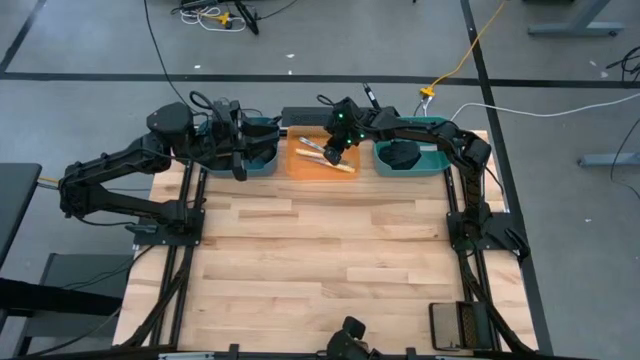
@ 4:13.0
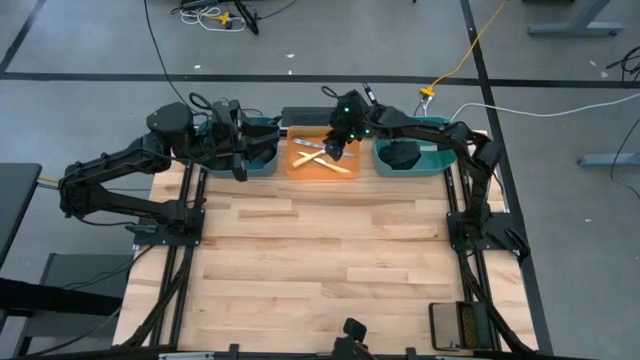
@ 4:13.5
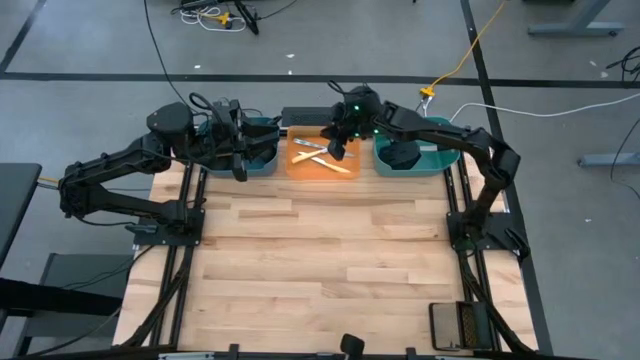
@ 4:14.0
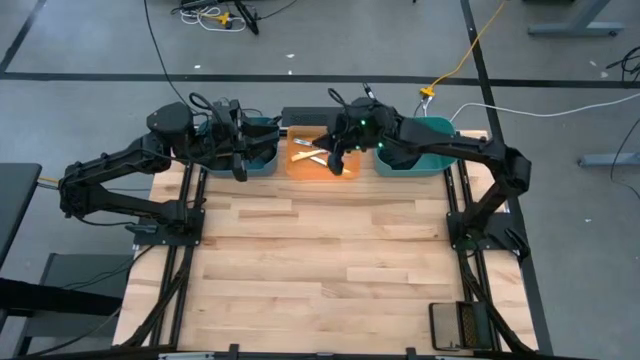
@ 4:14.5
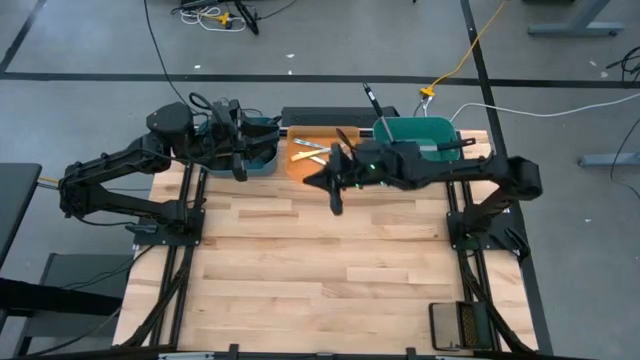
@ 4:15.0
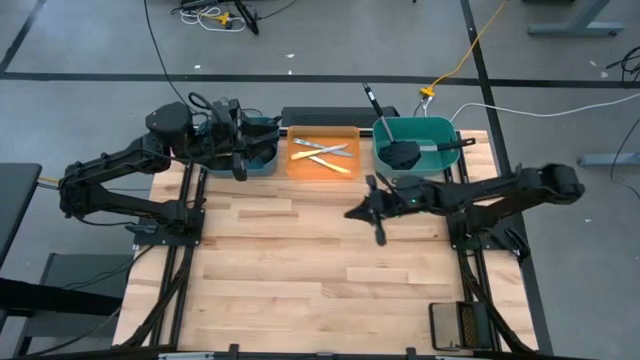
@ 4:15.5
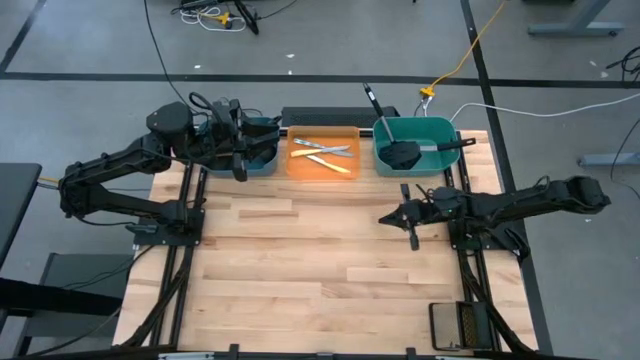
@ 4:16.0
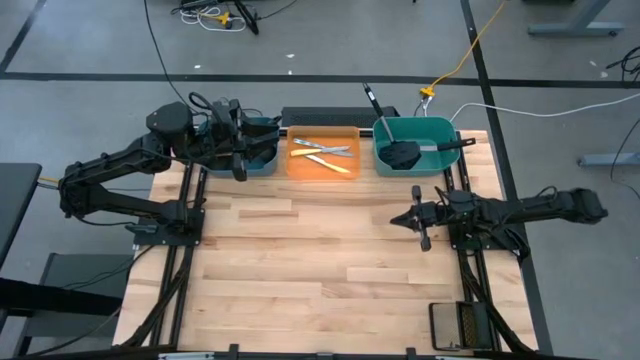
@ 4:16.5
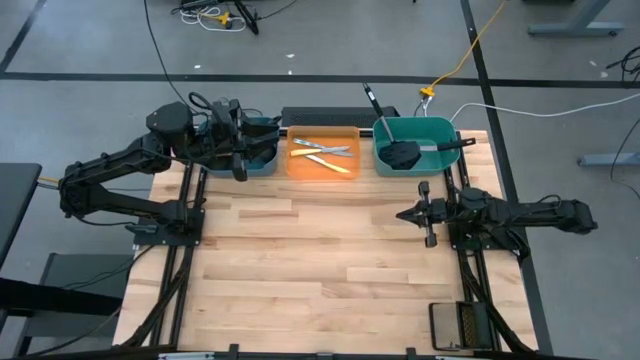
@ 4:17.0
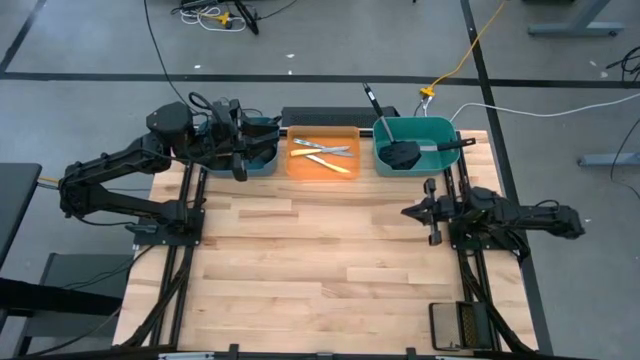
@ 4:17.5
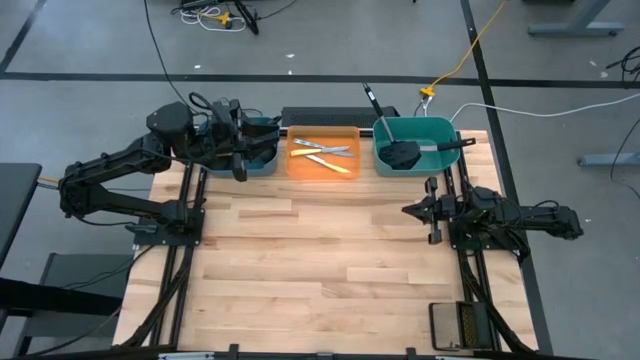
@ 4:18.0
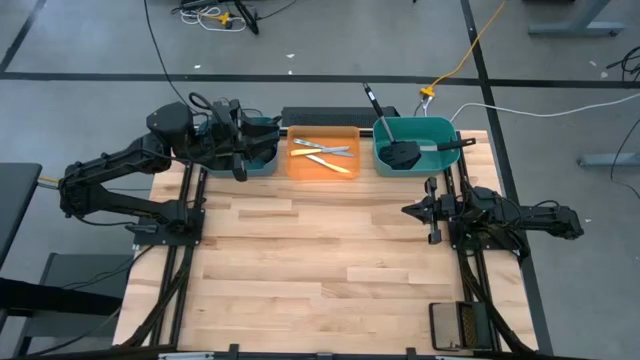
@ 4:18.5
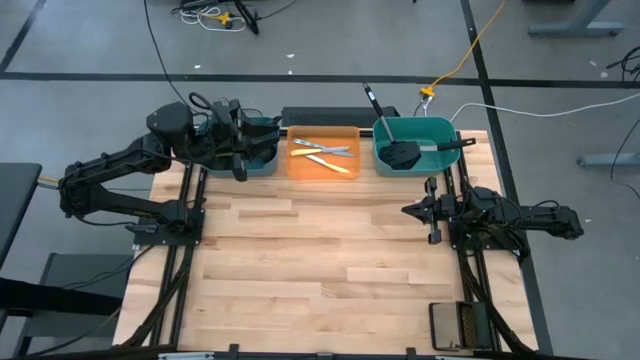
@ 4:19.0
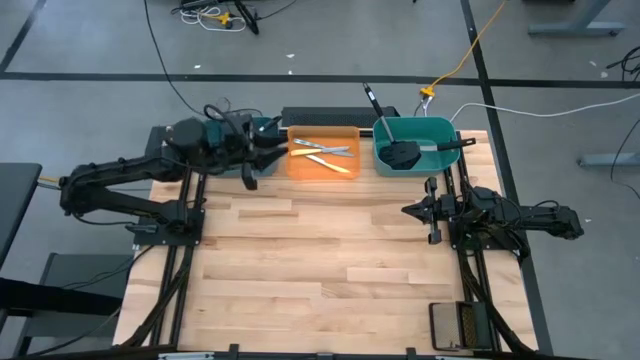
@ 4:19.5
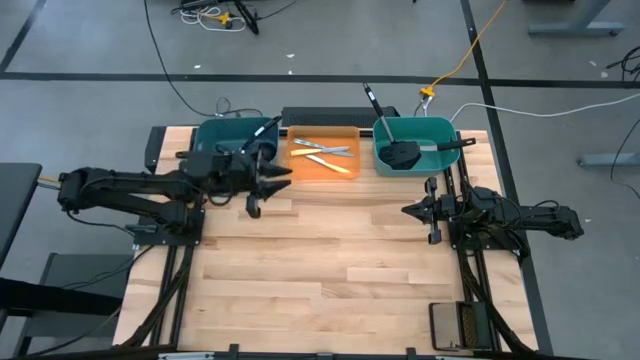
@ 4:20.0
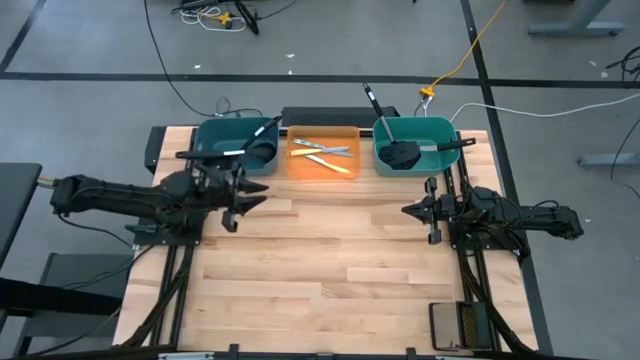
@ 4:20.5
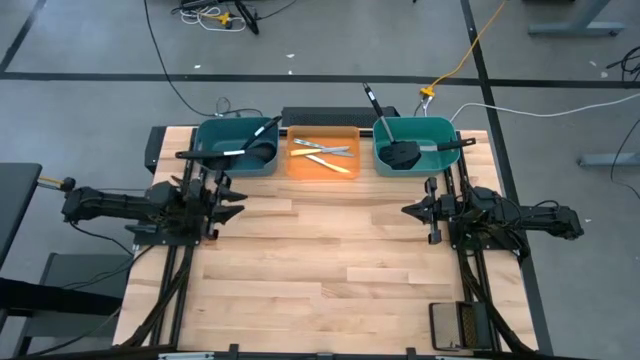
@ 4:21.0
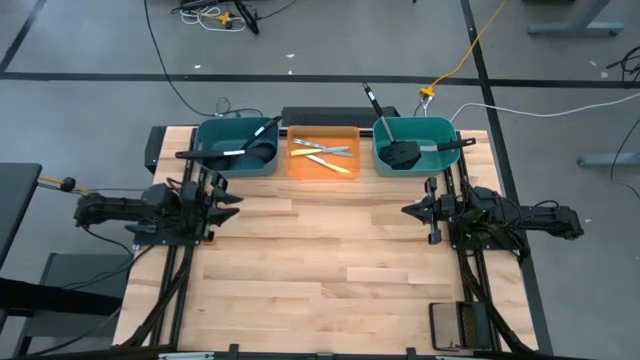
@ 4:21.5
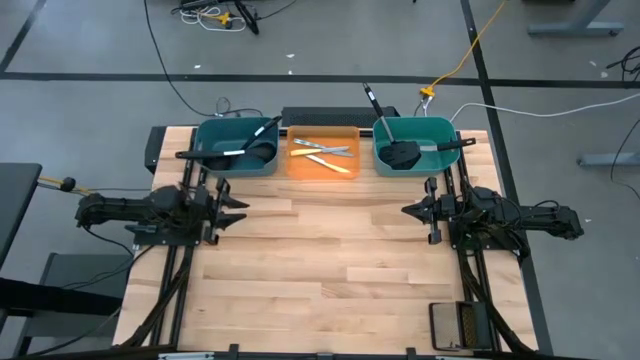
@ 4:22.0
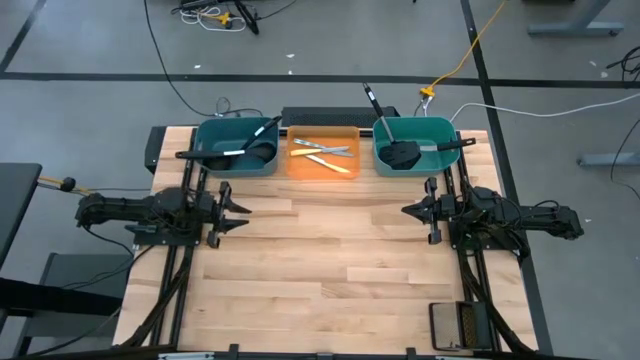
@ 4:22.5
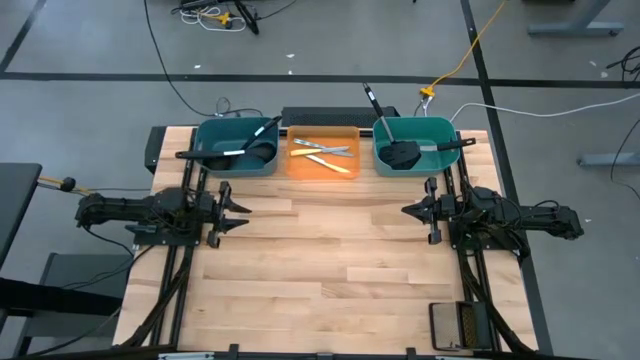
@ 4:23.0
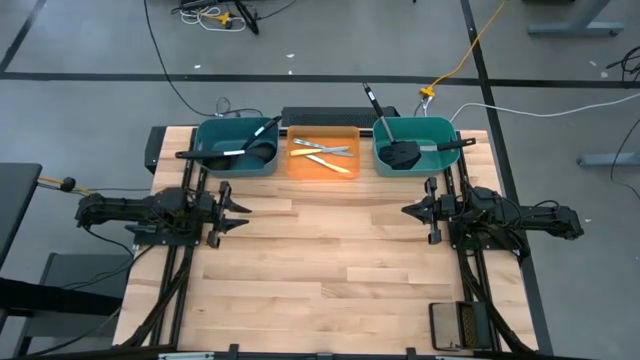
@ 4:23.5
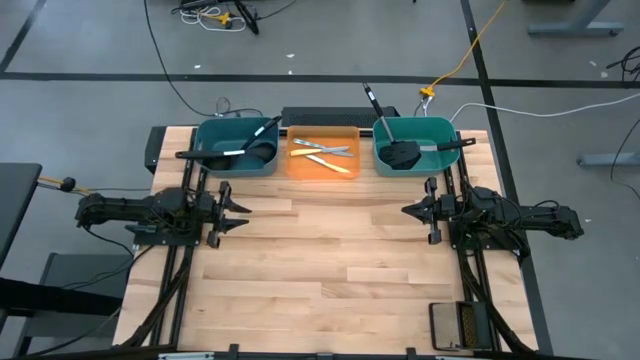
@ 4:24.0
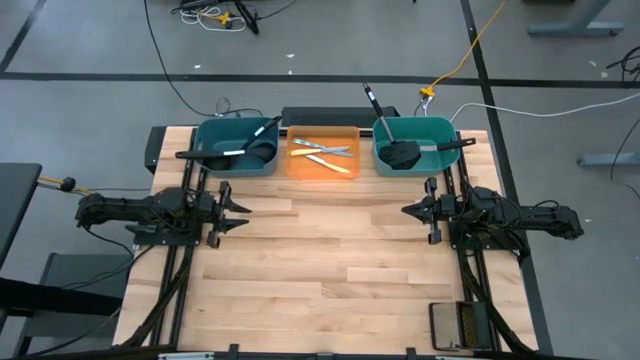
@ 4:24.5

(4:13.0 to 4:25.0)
Task: Pick & Place Kitchen Items
Return to Home Position

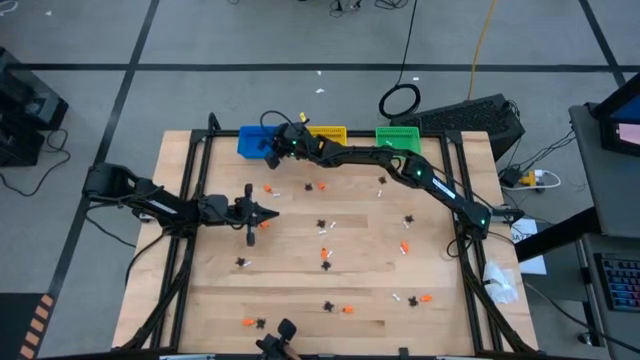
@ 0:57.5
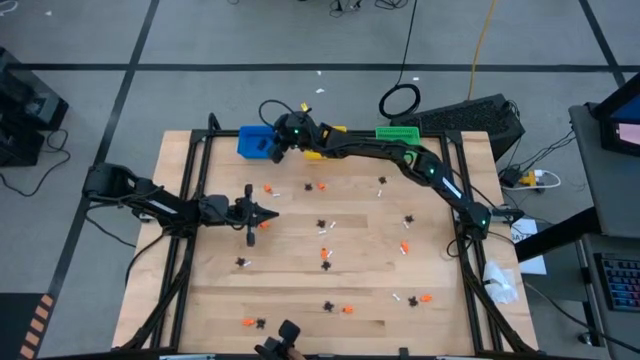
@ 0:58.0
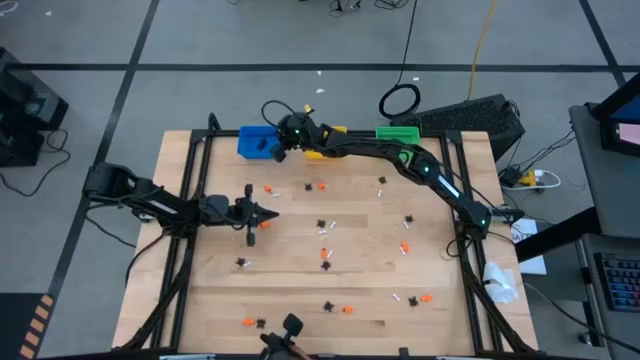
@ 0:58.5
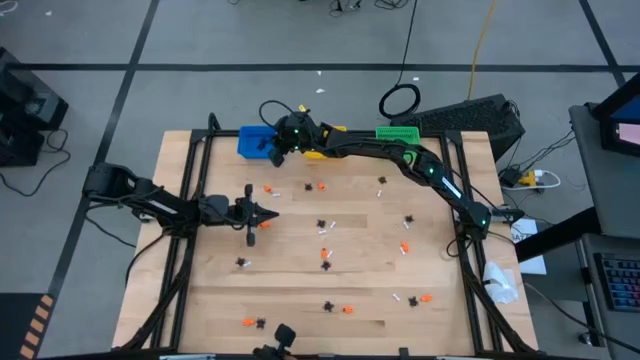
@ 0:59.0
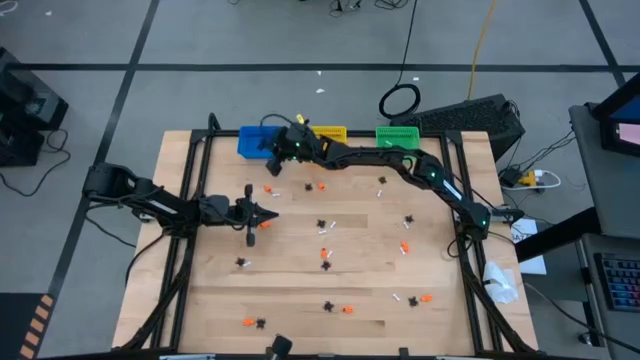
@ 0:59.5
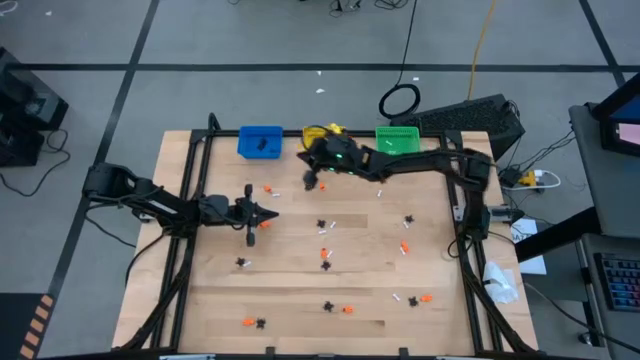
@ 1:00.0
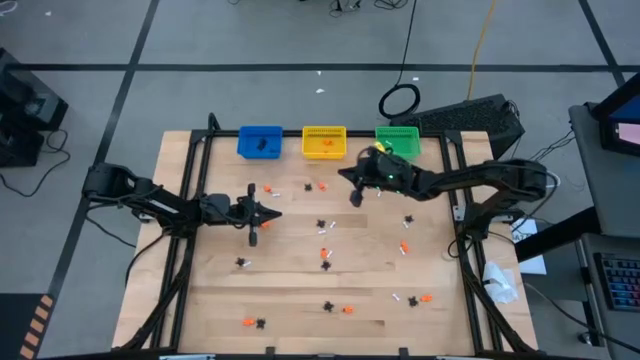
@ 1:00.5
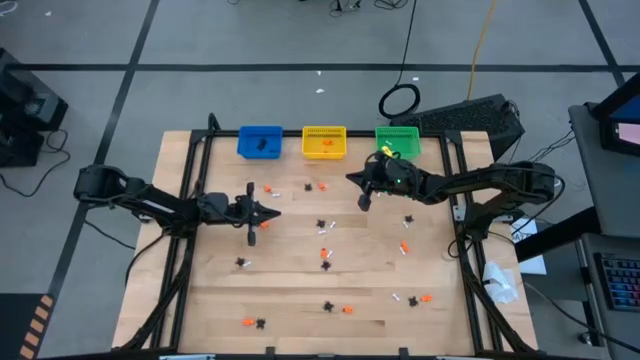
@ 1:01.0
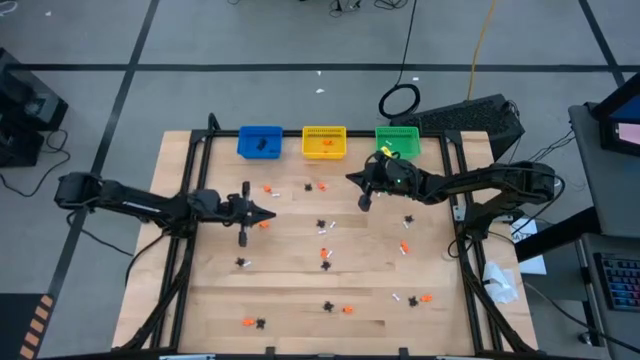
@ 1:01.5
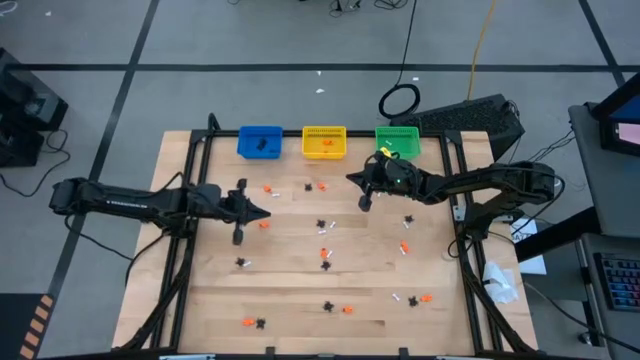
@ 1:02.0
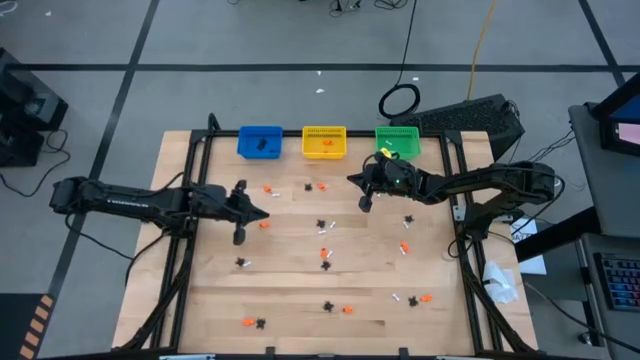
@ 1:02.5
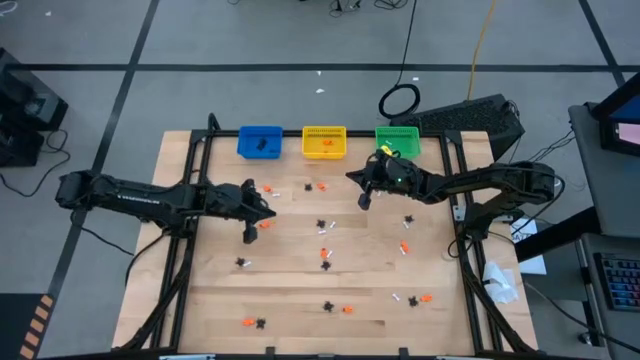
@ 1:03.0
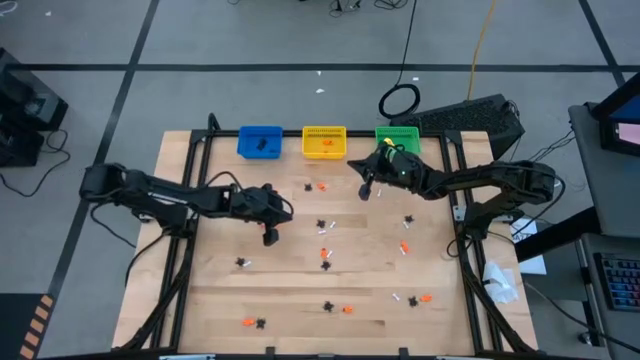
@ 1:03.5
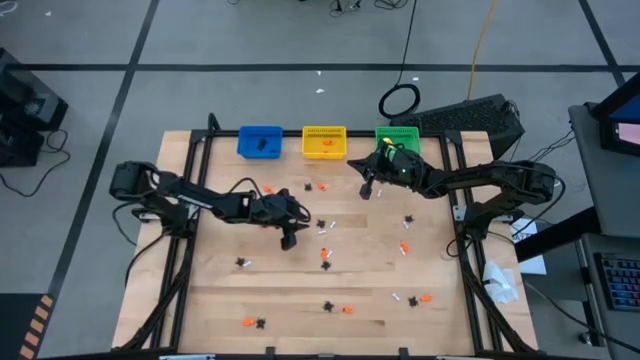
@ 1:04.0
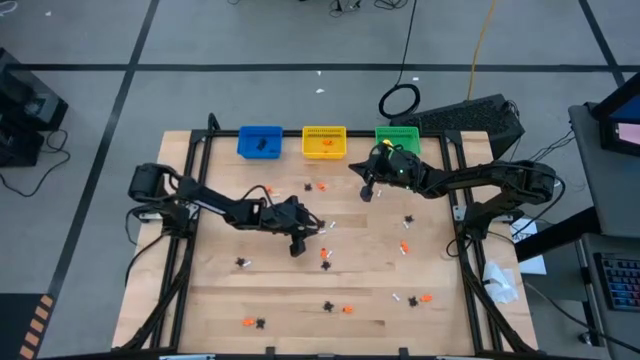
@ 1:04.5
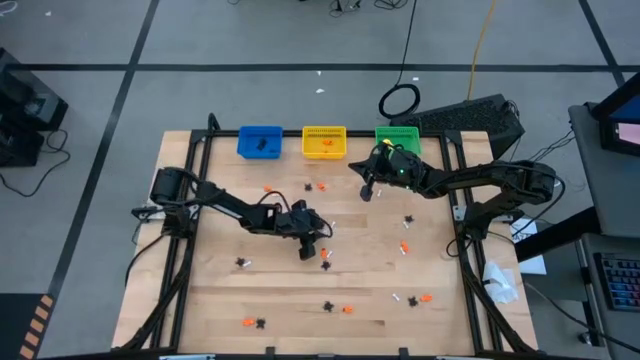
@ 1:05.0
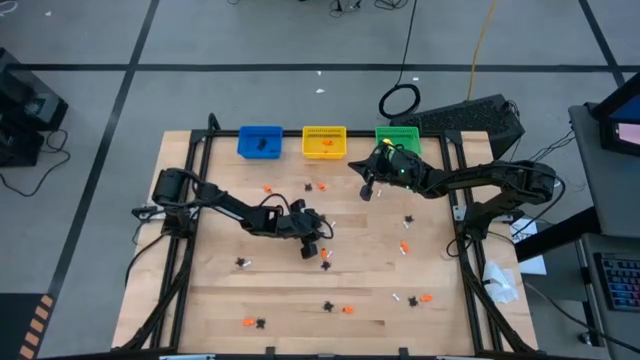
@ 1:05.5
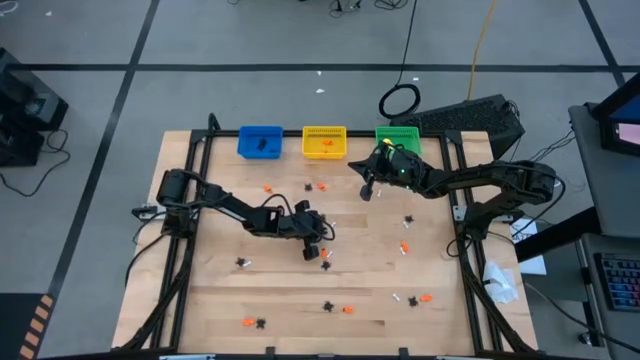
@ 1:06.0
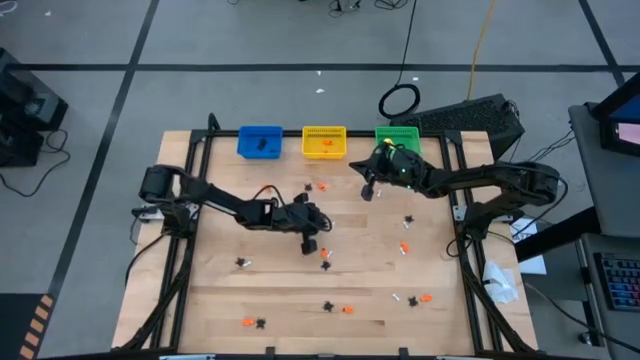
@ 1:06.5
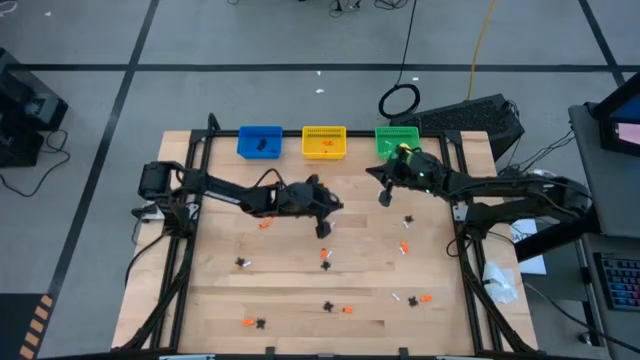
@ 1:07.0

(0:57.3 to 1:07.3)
Task: Sort Halloween decoration
Put the white bone toy into the green bin
